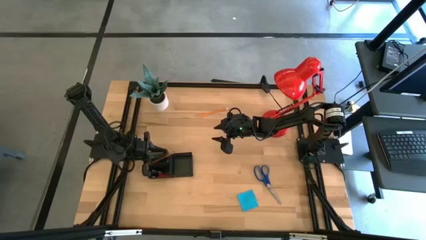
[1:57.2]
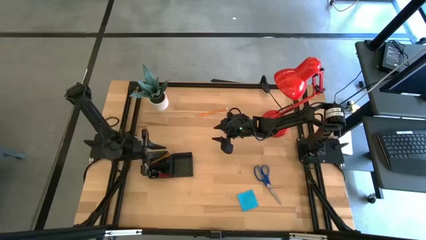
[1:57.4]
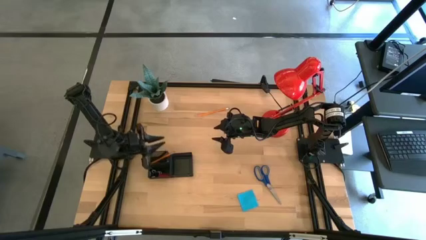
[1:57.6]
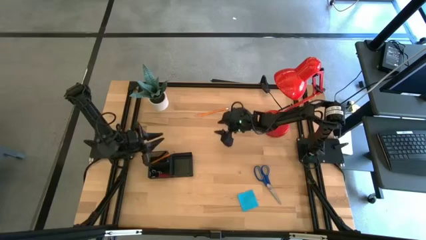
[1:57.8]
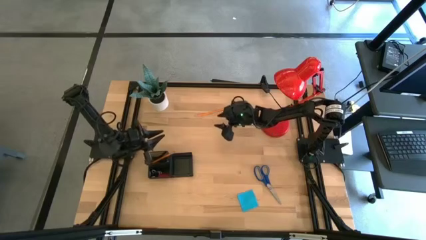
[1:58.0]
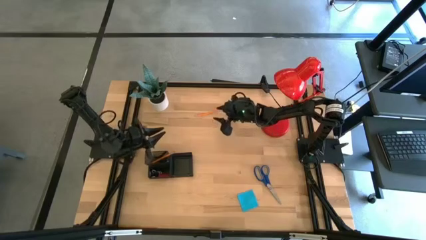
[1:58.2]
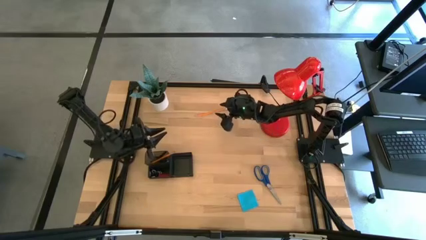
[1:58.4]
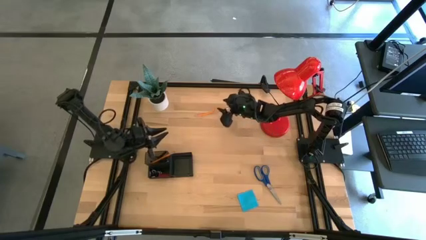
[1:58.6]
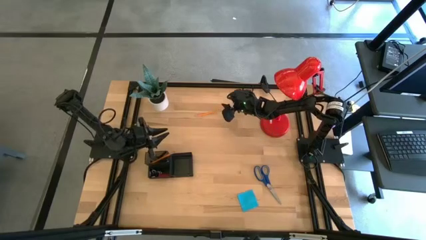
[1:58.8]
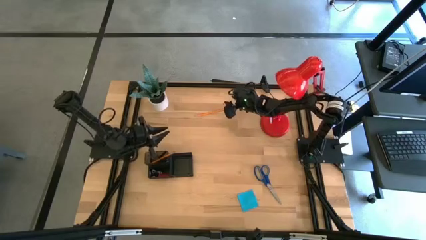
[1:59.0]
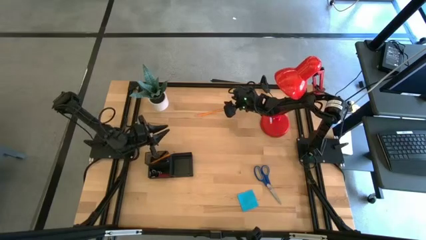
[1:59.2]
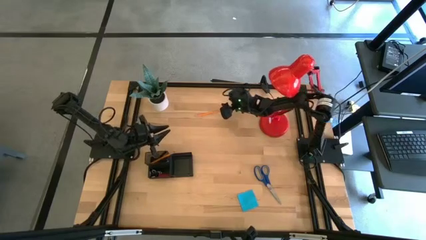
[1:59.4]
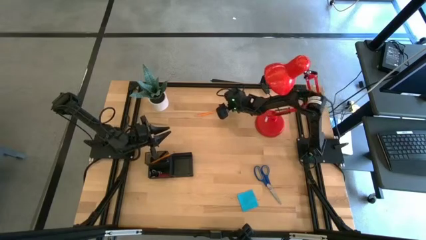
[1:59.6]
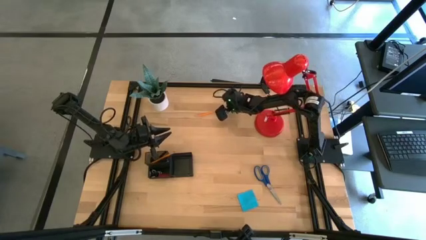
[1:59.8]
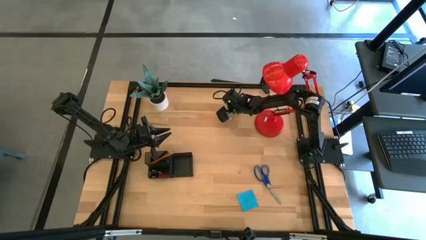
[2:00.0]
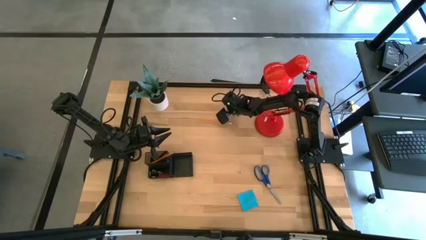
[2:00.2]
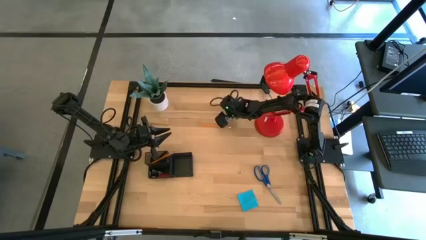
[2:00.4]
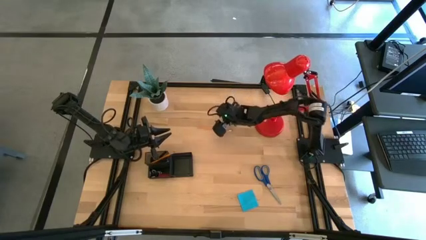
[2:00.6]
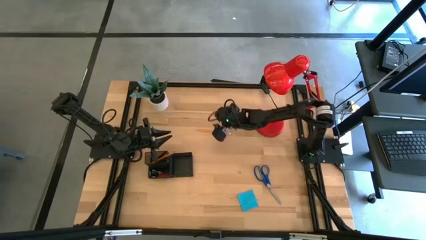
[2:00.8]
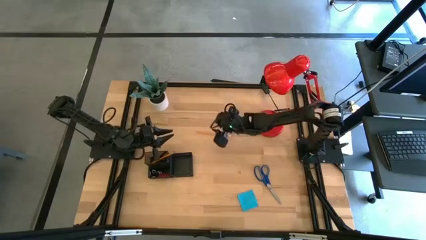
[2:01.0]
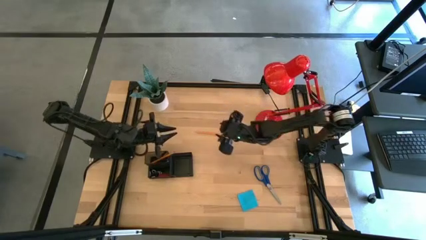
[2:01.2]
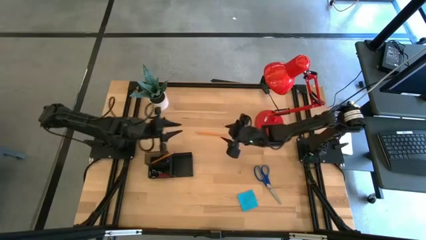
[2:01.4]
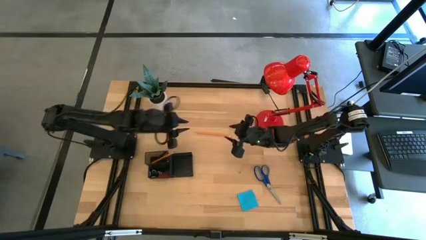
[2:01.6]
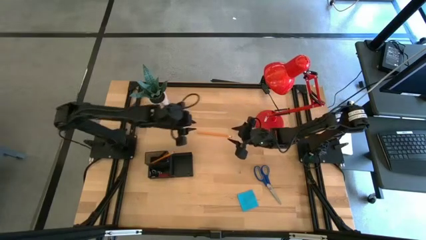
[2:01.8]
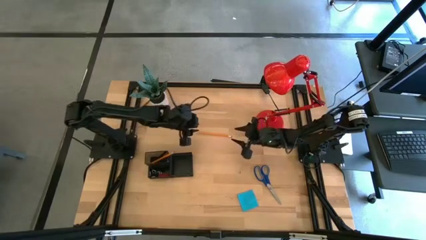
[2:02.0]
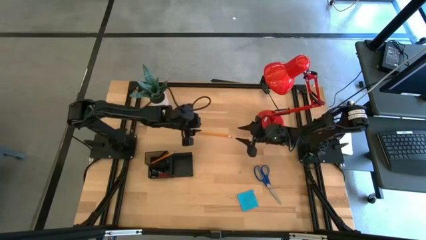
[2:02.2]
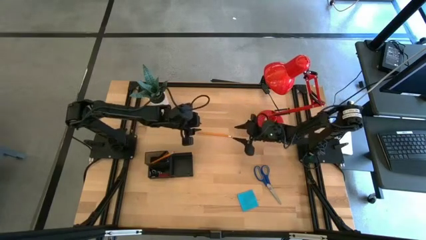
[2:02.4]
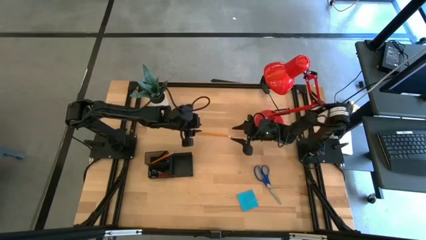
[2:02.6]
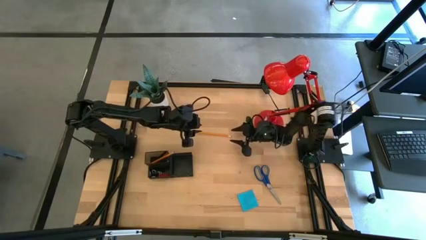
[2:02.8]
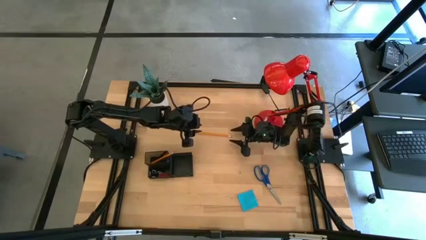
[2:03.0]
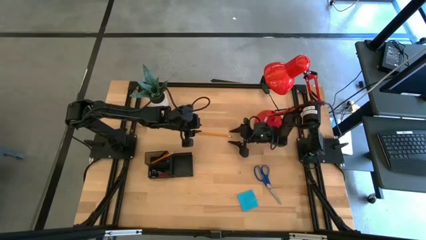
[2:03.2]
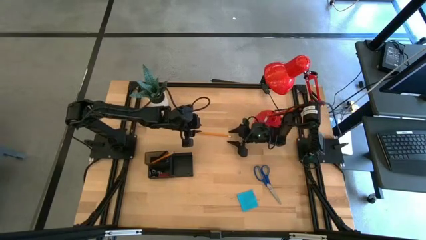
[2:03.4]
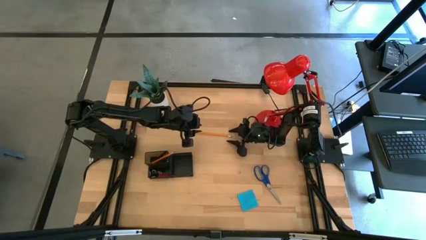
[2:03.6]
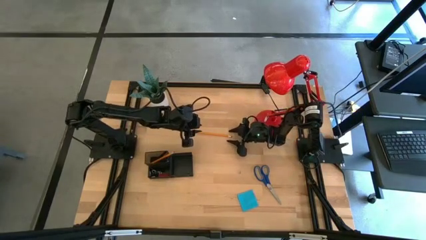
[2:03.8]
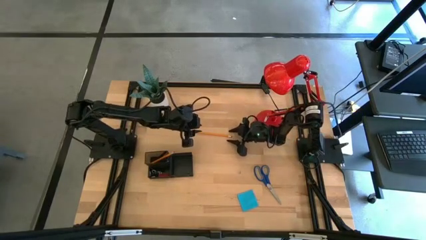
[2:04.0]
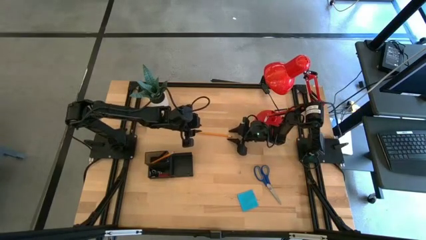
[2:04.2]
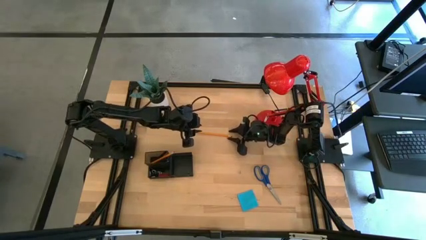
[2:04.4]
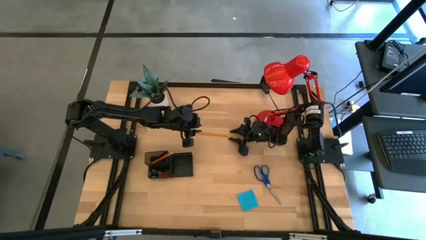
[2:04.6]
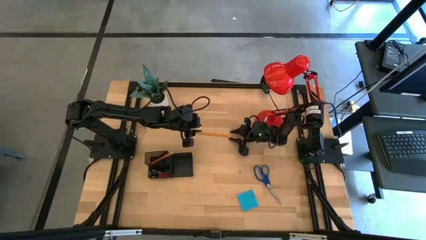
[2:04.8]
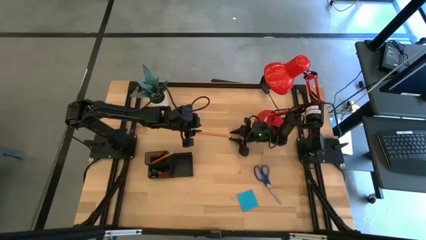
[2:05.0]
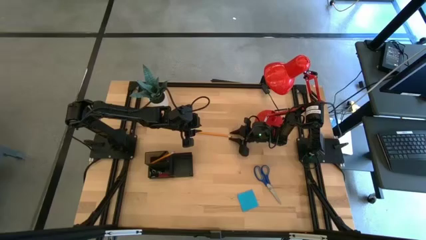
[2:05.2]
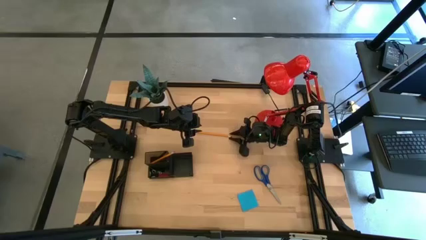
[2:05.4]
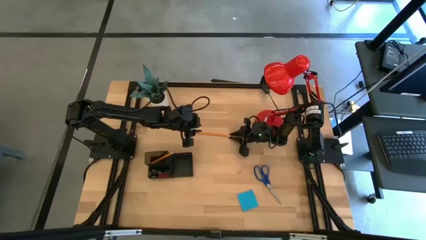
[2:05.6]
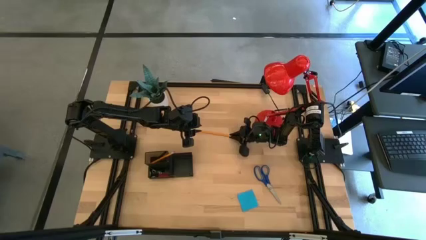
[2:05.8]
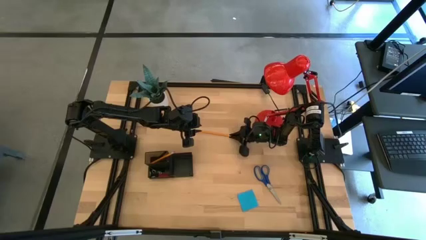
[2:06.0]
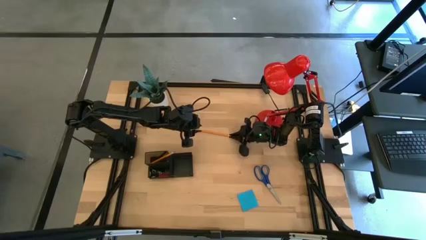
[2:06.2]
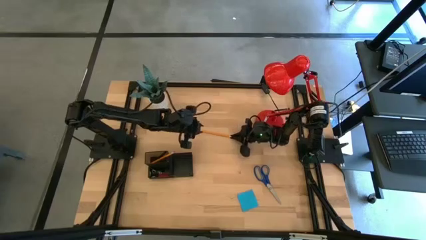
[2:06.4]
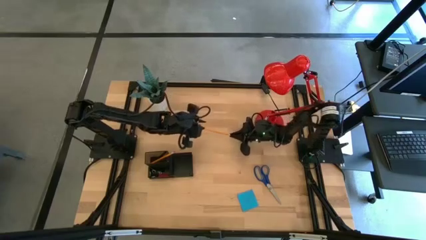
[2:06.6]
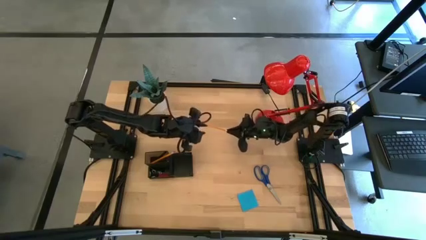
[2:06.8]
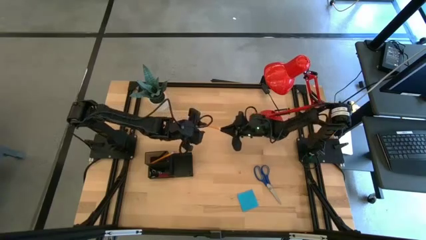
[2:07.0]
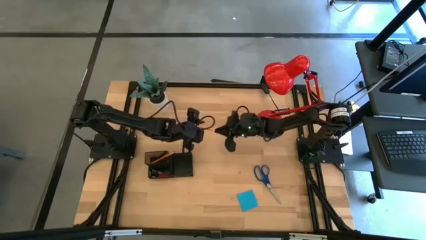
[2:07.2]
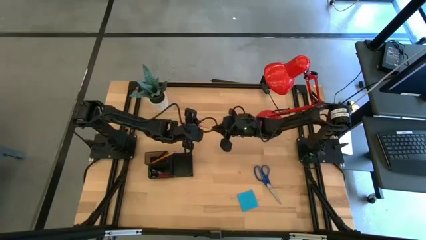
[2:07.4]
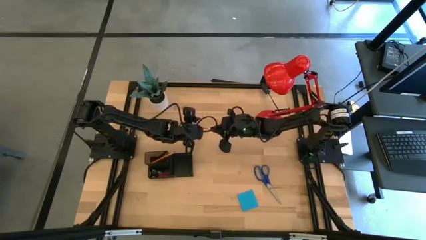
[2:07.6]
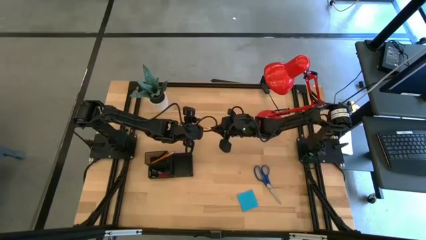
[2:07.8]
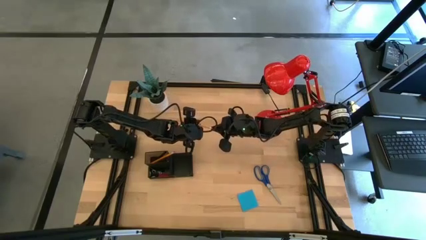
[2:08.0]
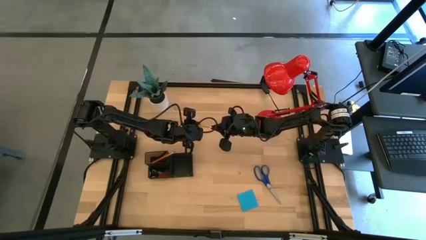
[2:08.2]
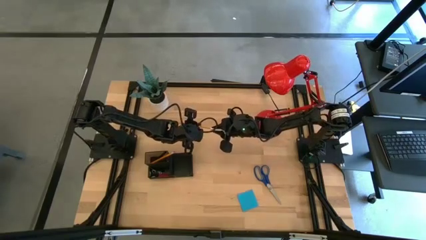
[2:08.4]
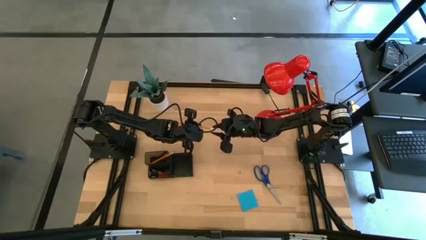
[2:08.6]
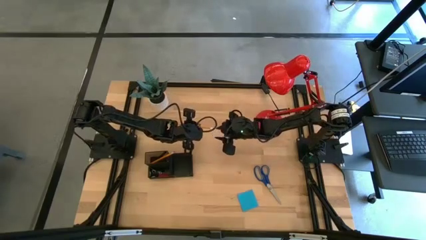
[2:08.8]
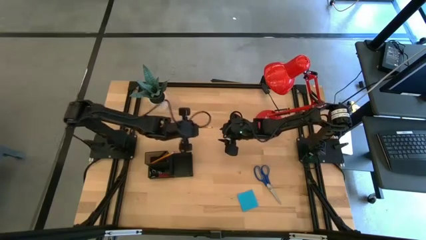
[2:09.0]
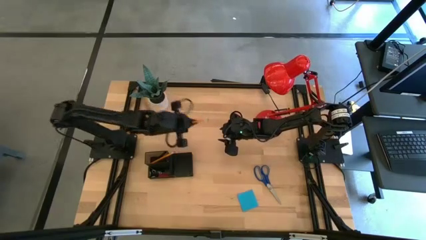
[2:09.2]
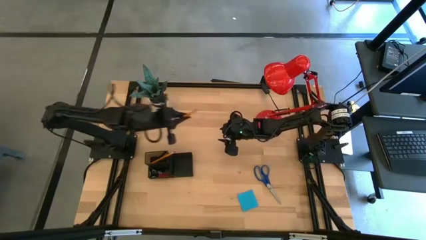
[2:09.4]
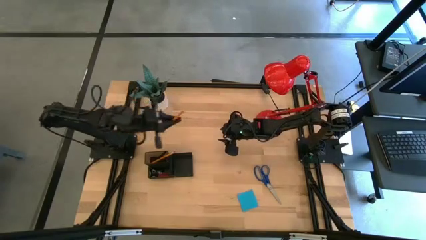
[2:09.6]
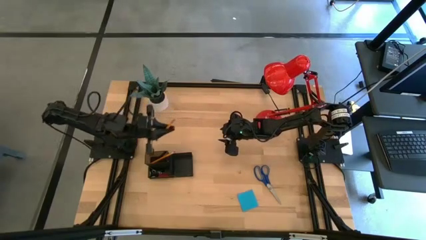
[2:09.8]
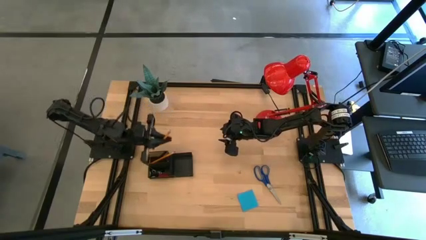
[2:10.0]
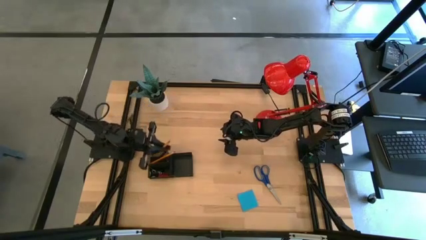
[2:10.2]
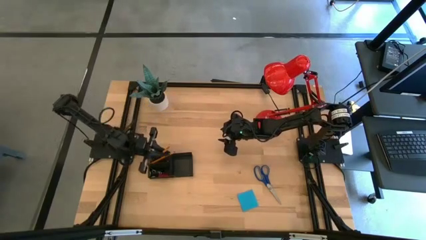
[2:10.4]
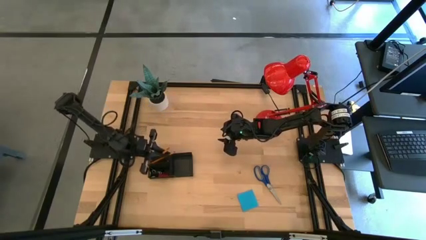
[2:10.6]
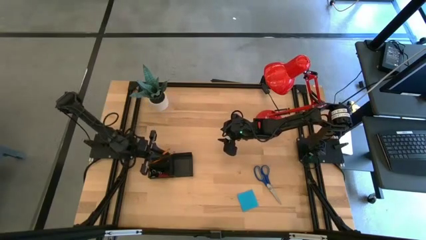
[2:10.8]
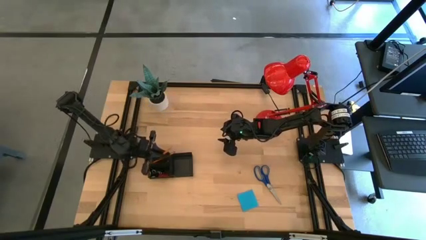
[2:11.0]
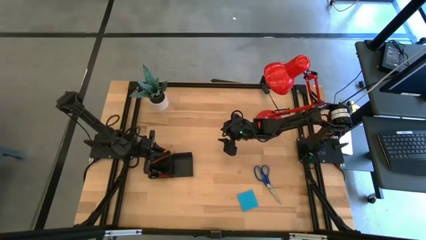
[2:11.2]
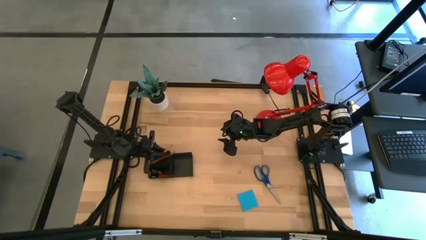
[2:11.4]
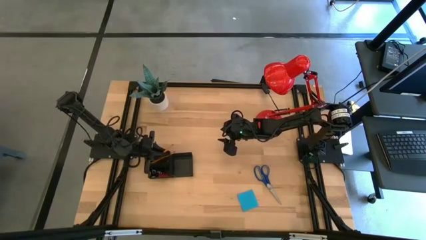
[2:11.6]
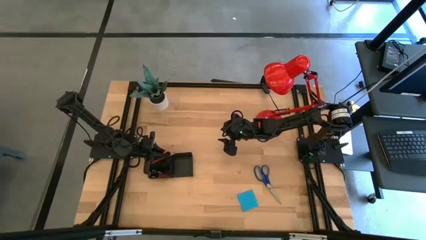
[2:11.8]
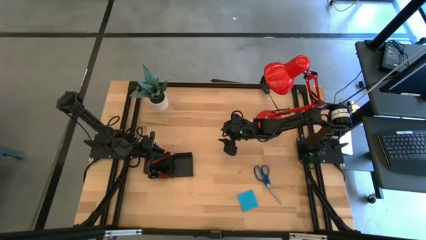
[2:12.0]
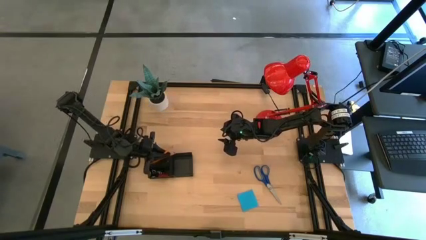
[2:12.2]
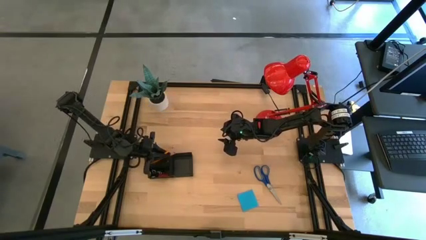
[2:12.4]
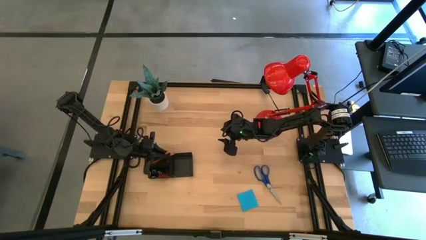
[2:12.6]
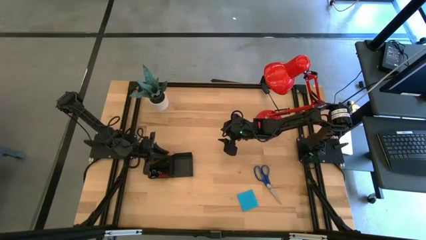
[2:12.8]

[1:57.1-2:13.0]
Task: Pick and place office supplies into organizer
Put the yellow pencil into the back left compartment of the desk organizer
